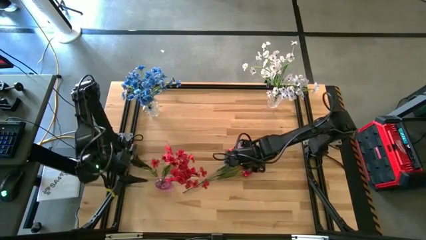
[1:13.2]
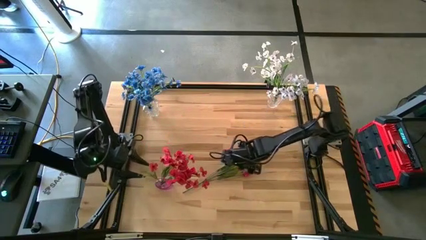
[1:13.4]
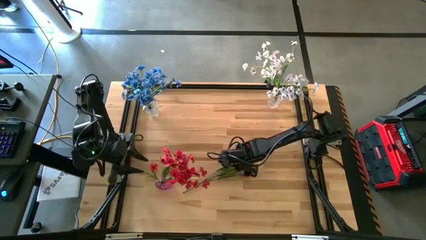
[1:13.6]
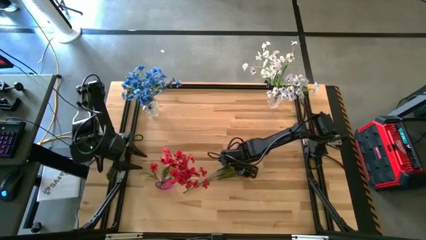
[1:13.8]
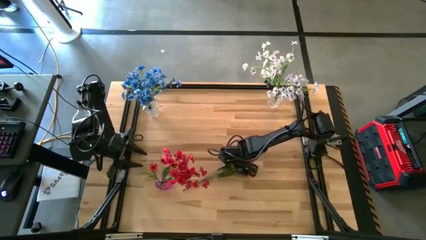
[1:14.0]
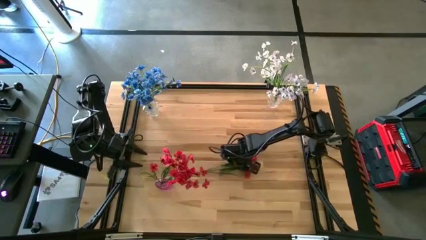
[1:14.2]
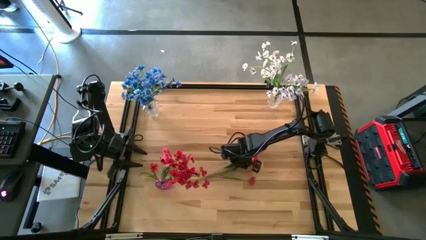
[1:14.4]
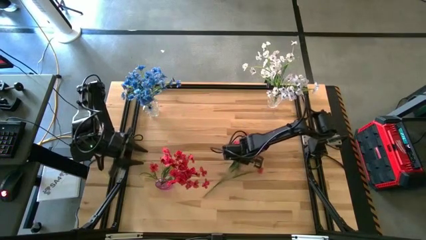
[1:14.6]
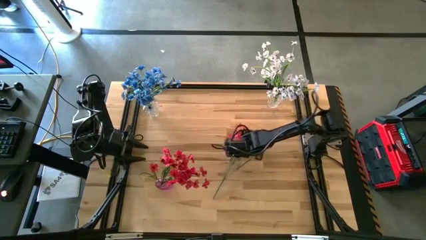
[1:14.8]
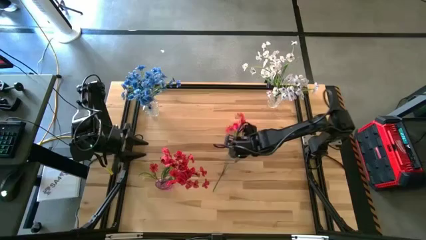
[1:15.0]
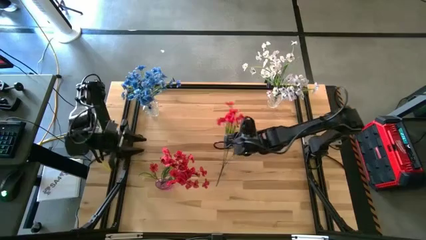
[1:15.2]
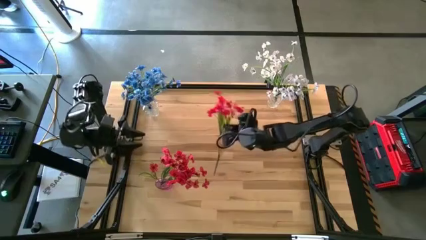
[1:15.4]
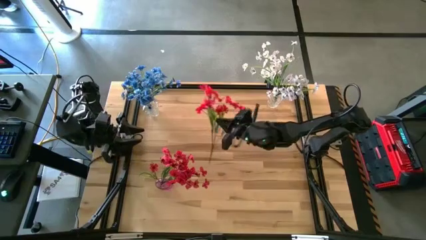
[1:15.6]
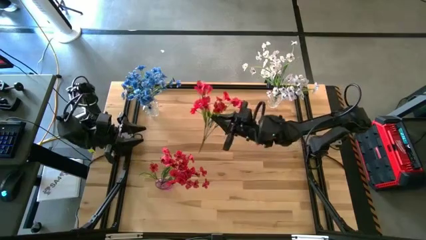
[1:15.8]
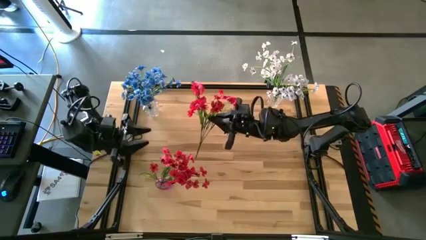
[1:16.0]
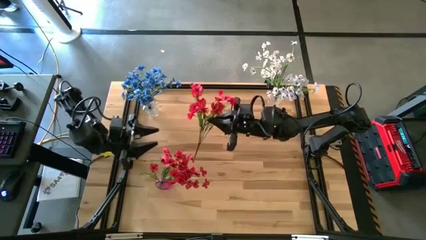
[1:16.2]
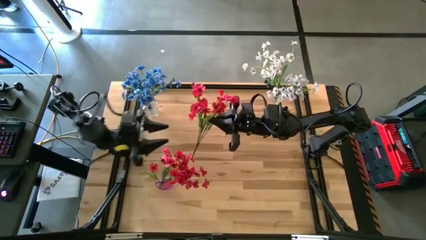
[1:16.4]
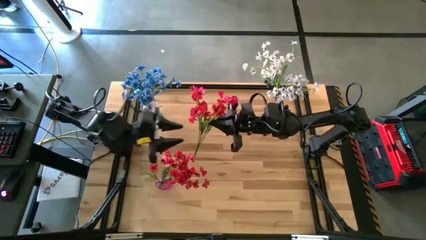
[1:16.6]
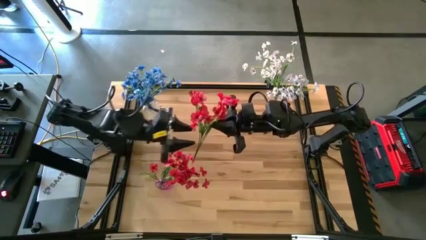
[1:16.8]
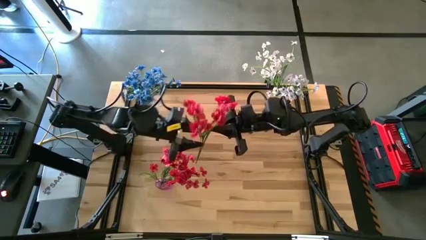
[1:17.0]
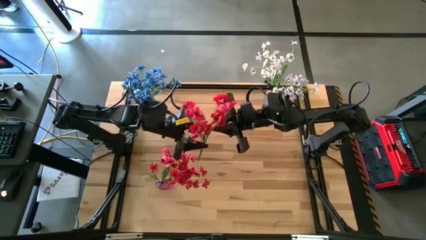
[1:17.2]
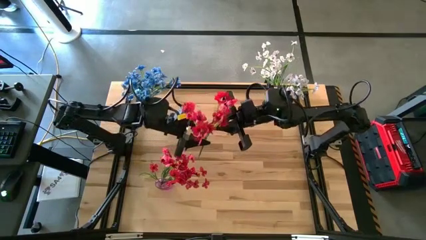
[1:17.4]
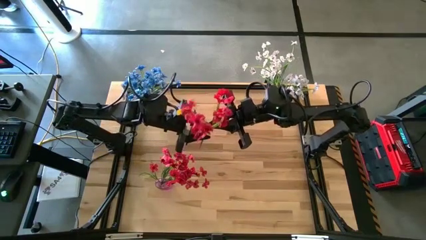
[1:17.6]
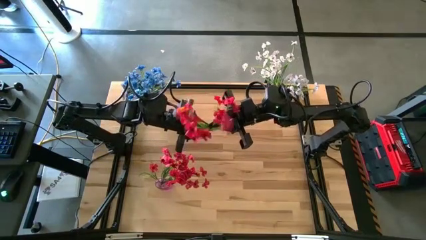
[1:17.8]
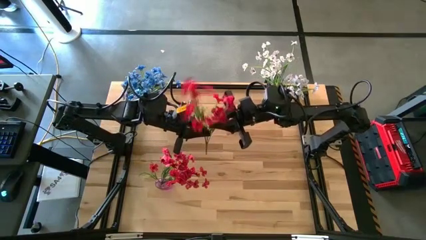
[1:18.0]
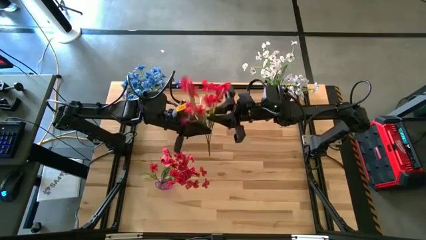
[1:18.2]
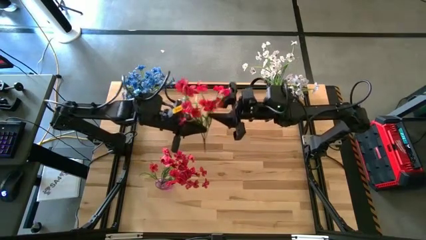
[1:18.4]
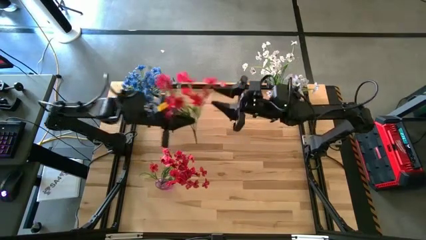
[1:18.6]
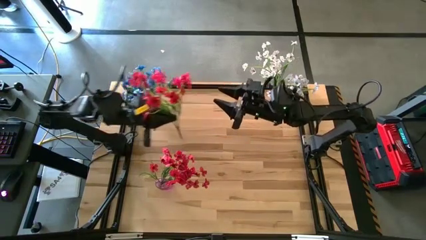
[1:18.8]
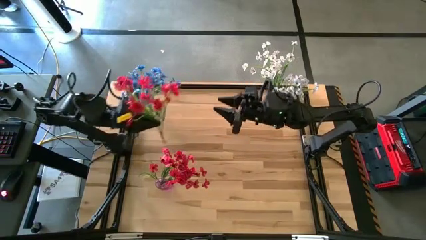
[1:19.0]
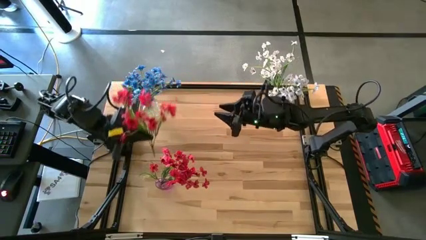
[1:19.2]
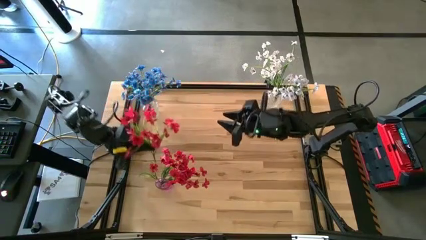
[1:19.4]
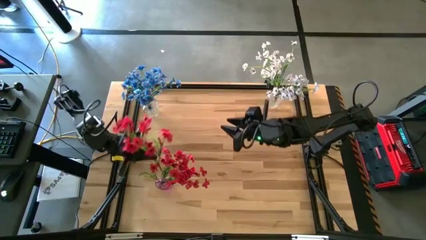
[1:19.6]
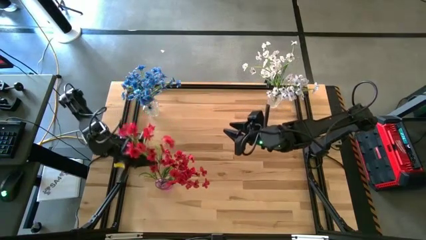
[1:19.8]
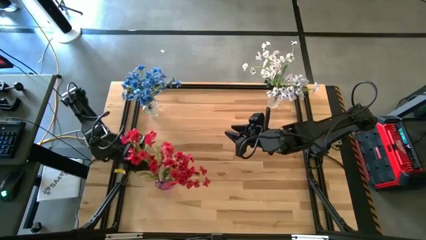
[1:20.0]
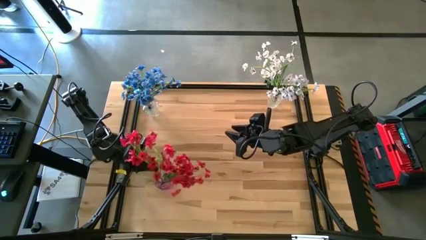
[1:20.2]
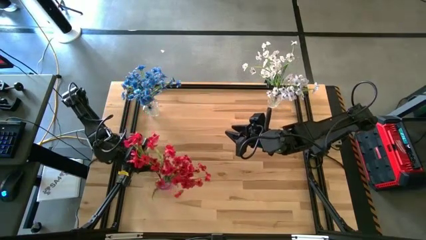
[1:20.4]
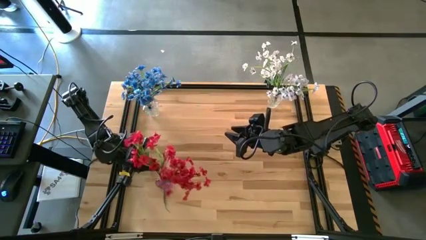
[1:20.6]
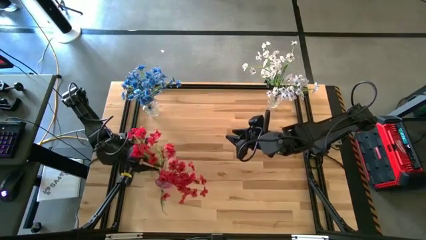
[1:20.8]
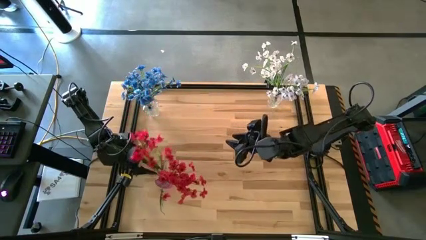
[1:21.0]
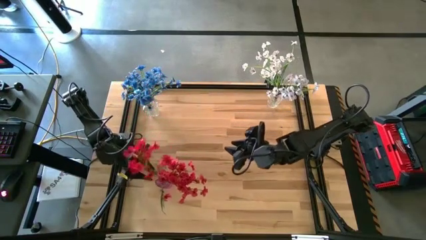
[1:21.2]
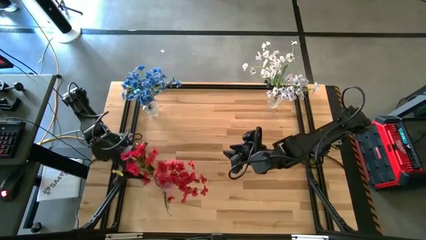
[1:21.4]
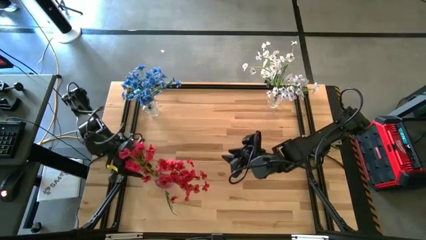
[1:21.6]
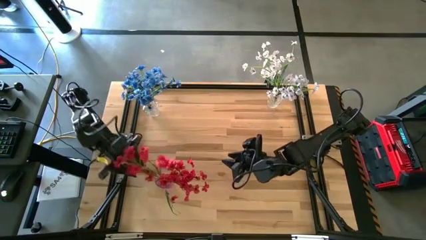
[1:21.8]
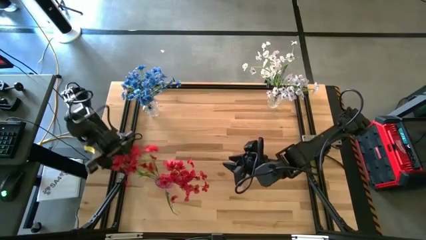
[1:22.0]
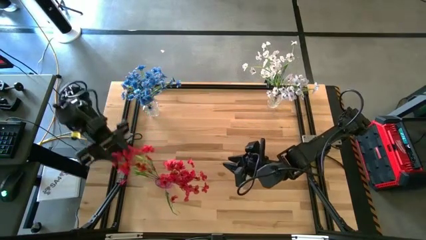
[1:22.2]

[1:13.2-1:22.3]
Task: Sort flowers into vase by color
Put the red flowers into the pink vase

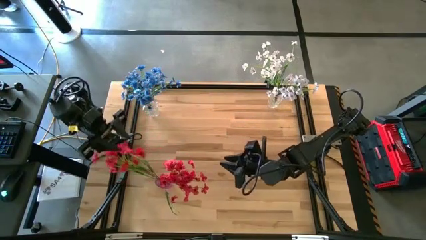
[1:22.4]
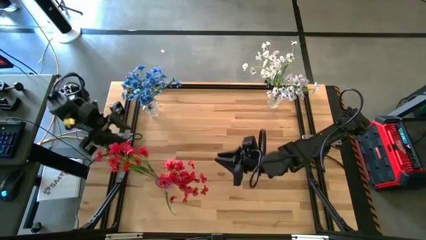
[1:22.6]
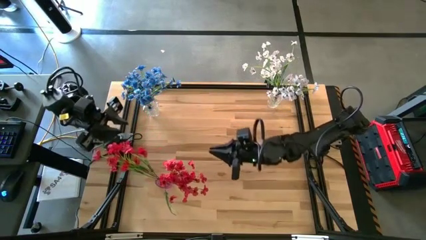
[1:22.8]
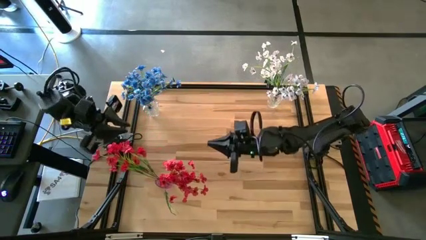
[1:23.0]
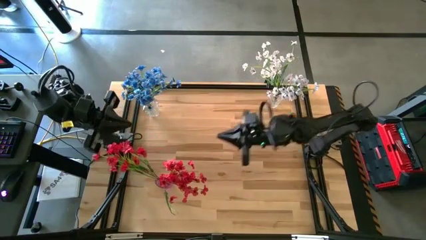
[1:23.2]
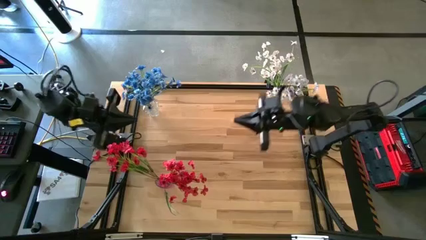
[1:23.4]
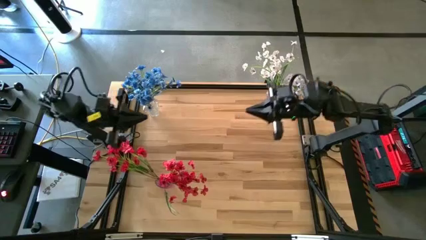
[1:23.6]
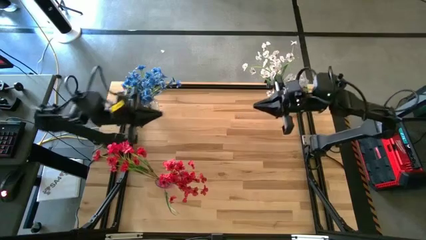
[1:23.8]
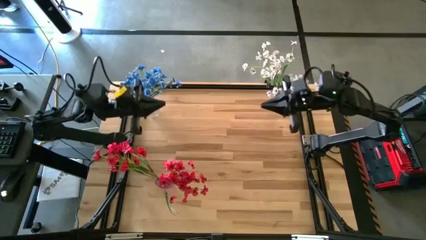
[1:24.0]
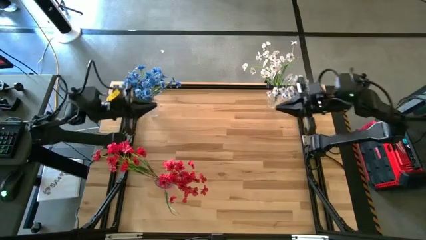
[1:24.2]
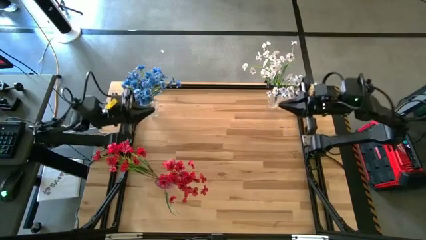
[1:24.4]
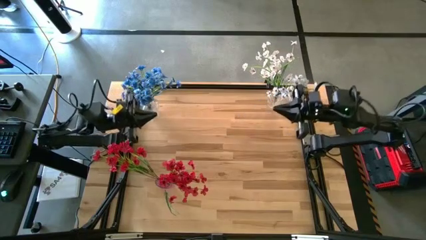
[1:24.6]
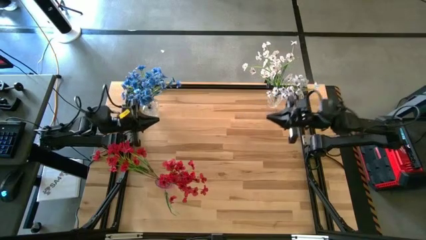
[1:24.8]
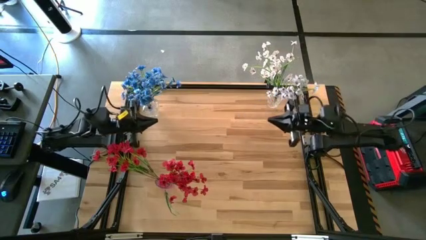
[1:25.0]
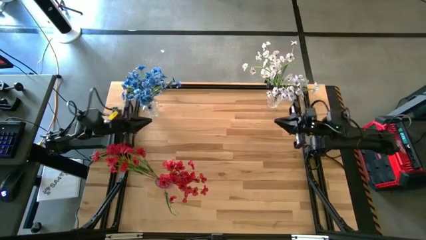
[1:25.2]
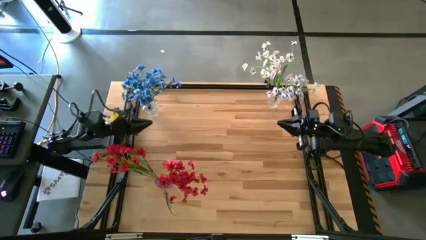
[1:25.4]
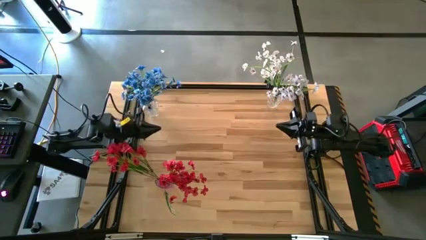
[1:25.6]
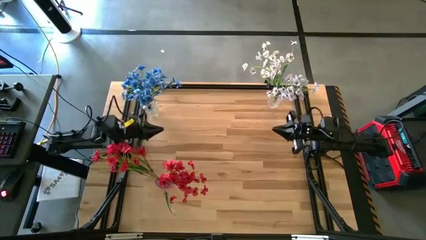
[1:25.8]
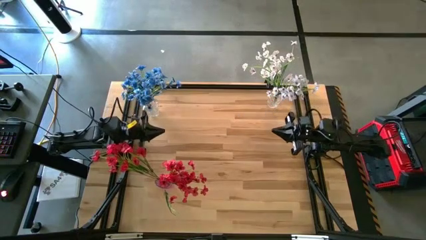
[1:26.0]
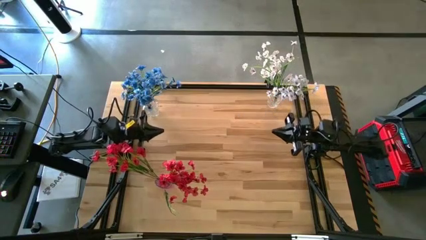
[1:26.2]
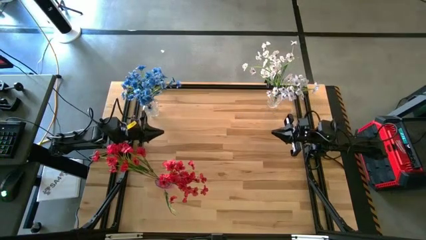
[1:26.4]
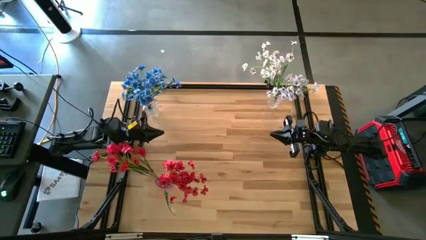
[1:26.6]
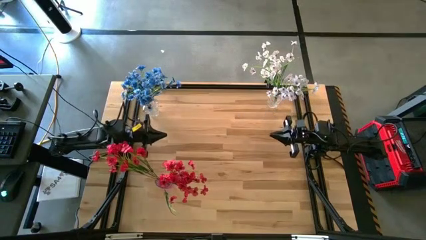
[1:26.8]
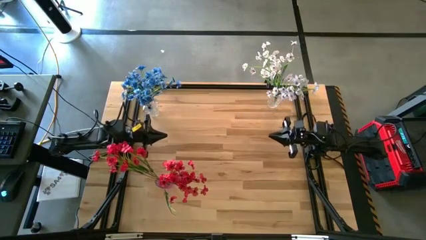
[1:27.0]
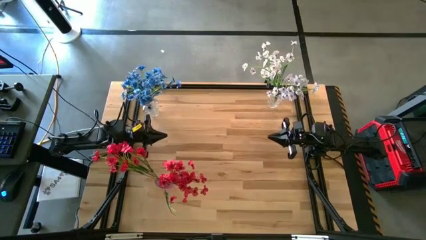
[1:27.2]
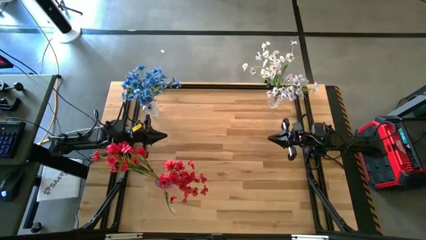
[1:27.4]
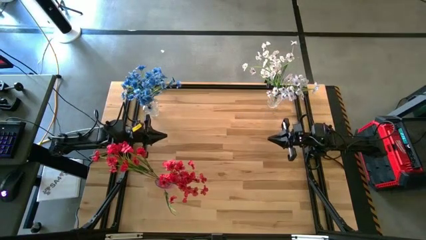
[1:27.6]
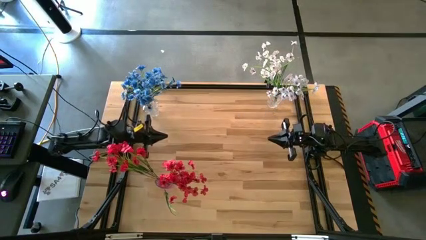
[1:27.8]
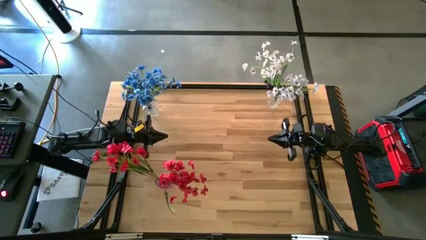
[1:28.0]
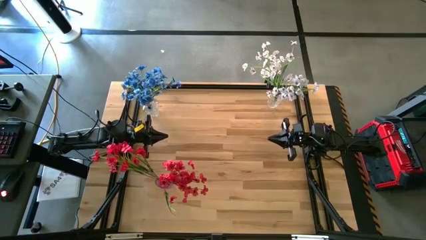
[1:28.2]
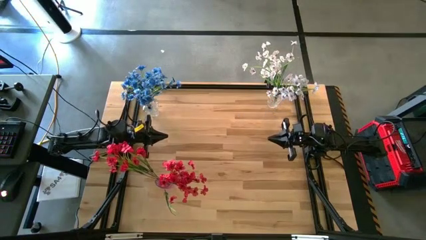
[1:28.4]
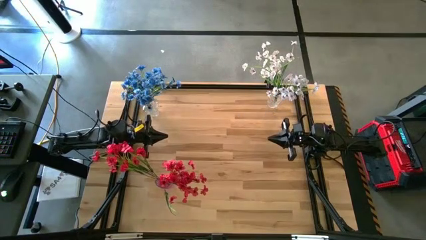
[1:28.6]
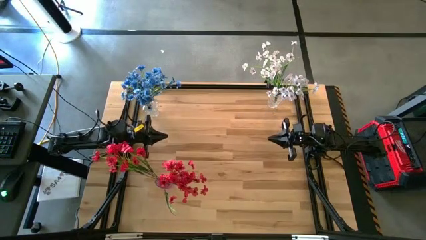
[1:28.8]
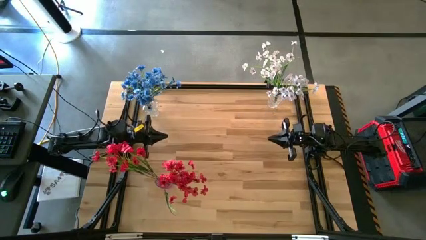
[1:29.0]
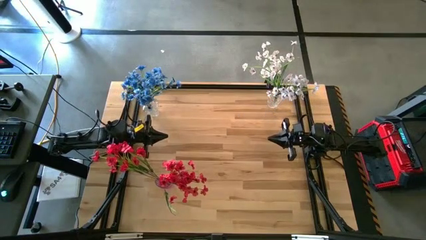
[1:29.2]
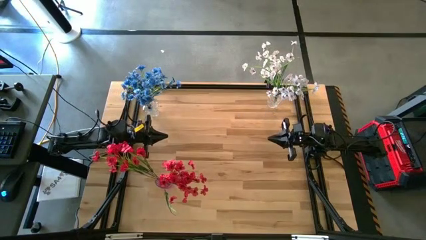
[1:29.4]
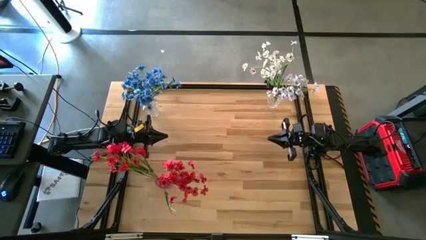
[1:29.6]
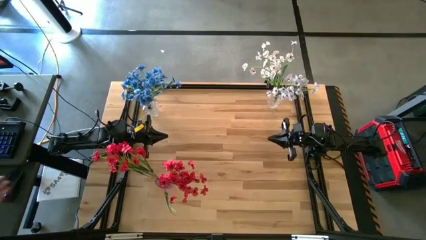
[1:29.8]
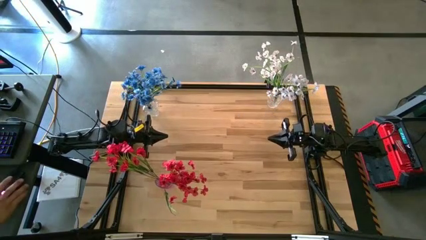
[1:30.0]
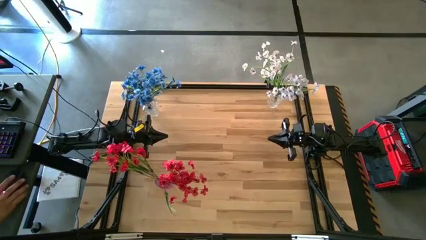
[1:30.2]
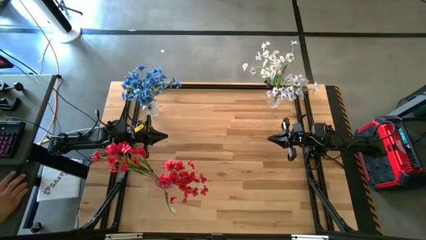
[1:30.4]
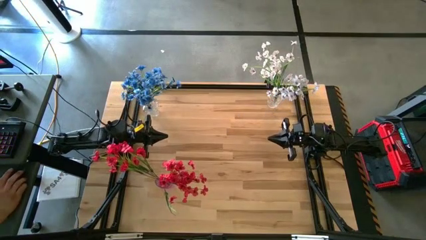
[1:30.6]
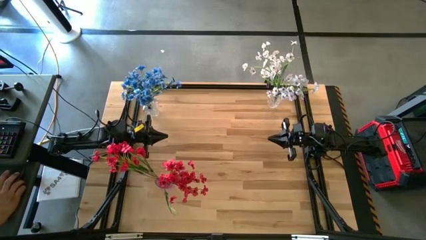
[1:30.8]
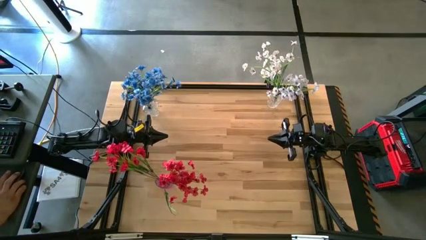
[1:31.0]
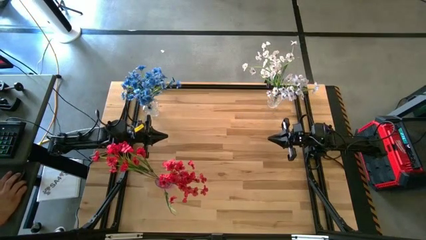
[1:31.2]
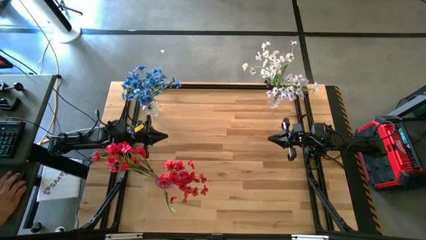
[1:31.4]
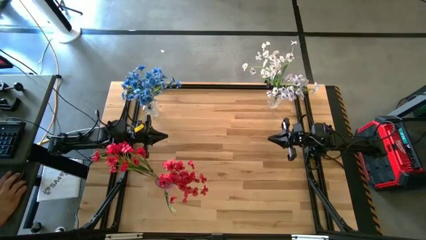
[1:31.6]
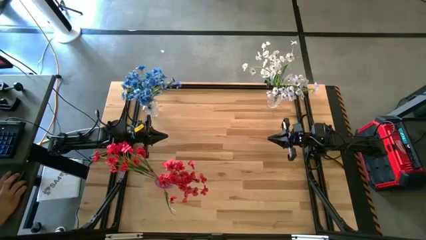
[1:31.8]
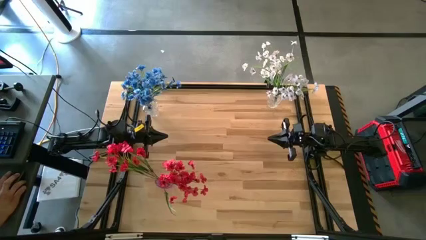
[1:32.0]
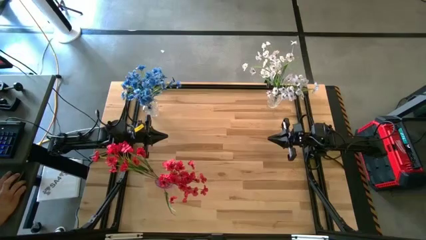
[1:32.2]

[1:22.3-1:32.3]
Return to Home Position
